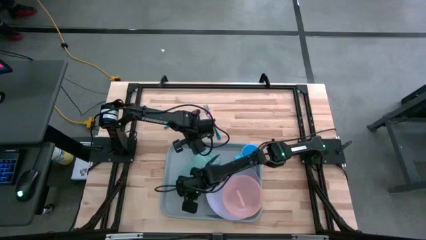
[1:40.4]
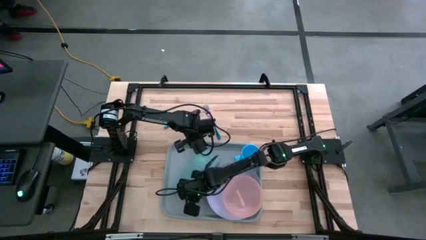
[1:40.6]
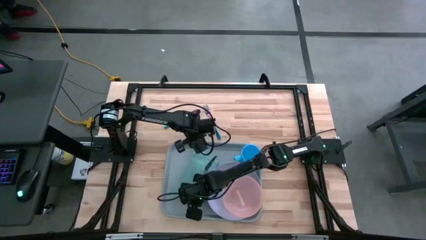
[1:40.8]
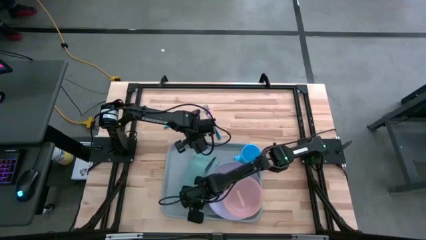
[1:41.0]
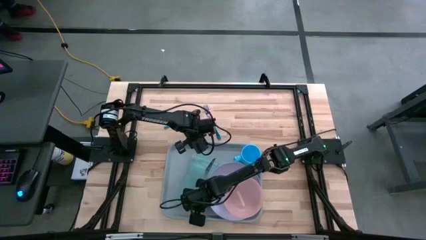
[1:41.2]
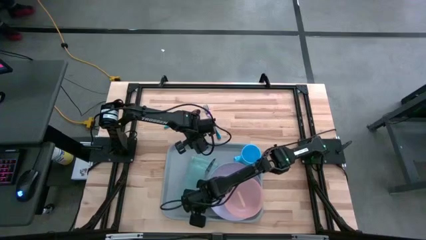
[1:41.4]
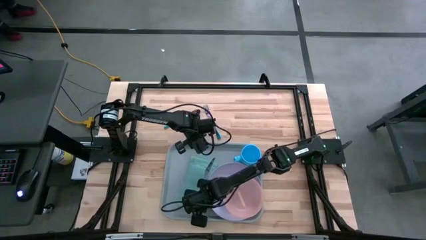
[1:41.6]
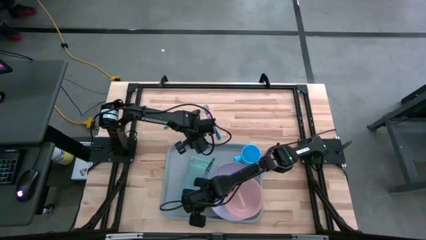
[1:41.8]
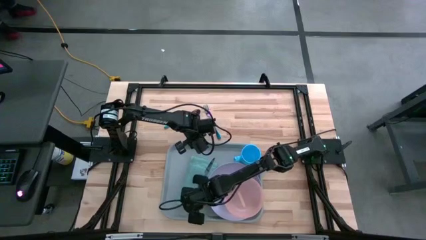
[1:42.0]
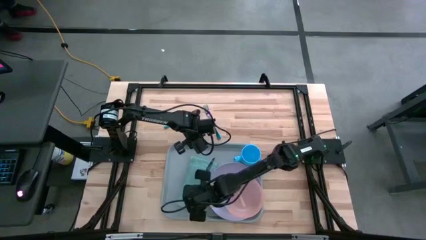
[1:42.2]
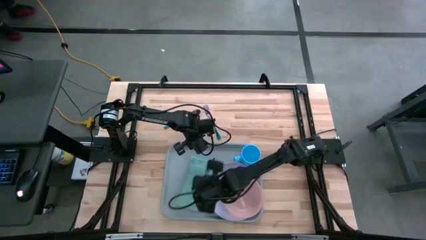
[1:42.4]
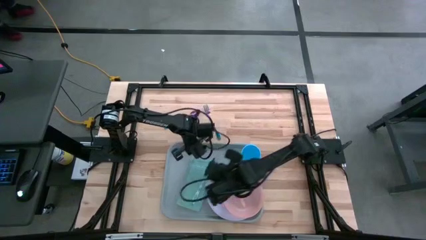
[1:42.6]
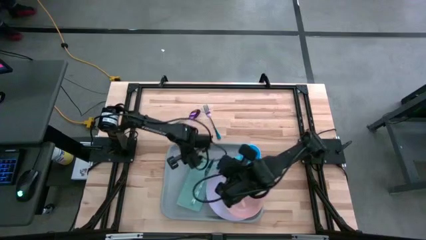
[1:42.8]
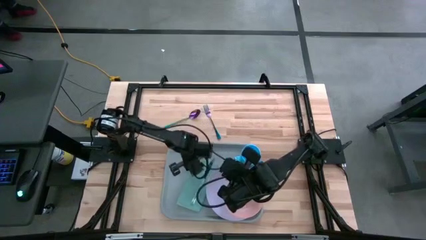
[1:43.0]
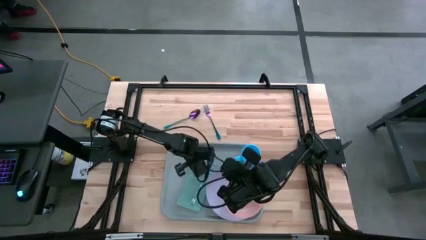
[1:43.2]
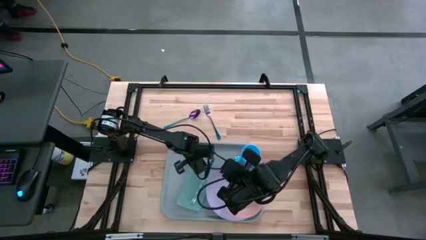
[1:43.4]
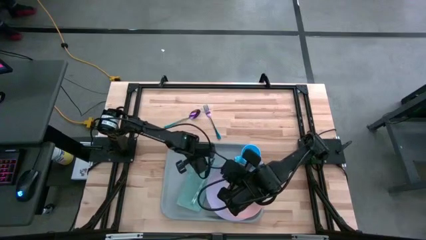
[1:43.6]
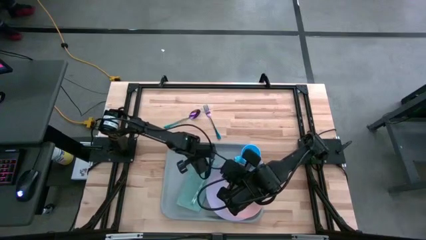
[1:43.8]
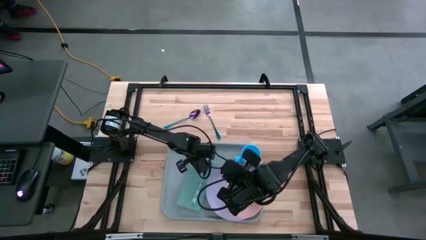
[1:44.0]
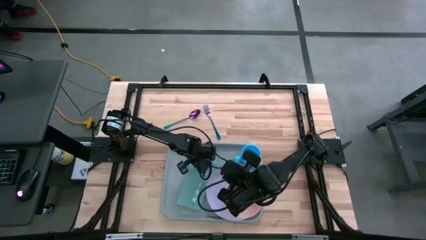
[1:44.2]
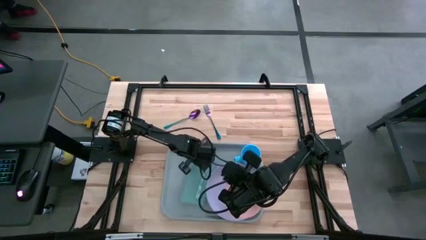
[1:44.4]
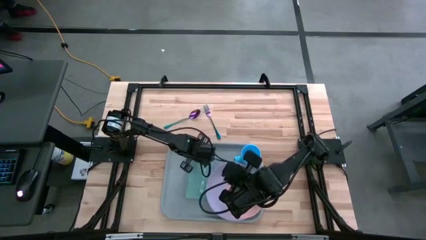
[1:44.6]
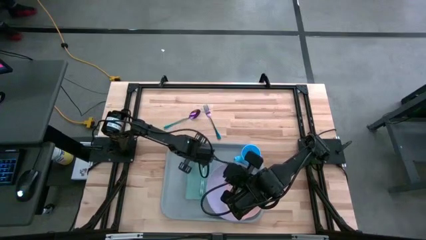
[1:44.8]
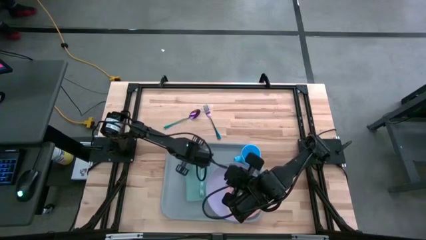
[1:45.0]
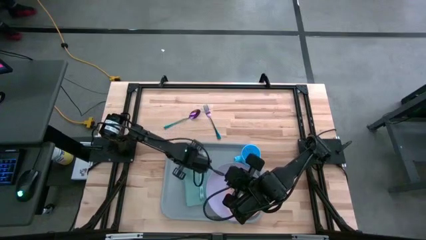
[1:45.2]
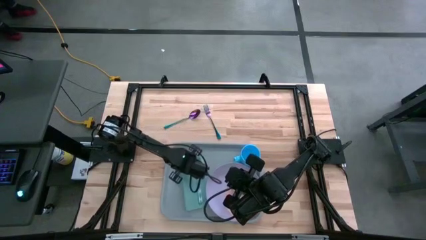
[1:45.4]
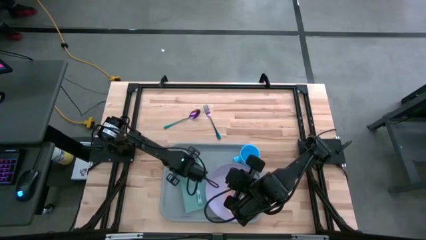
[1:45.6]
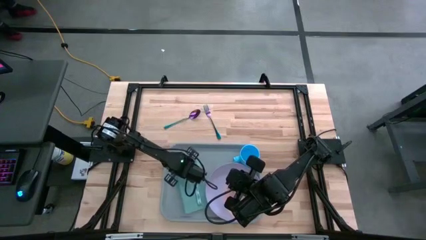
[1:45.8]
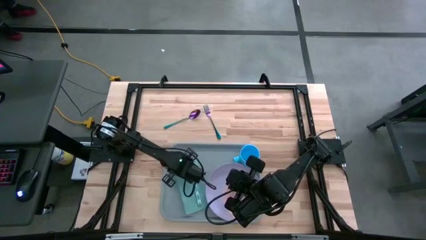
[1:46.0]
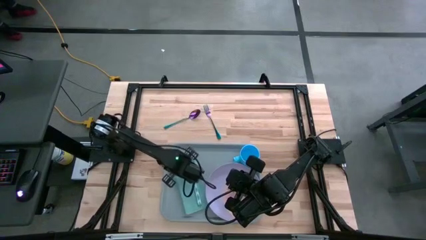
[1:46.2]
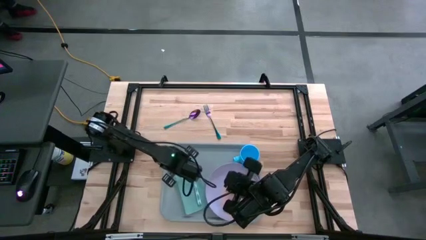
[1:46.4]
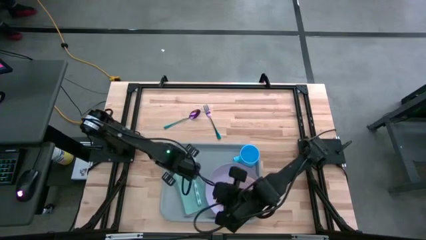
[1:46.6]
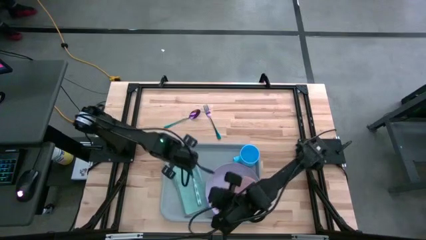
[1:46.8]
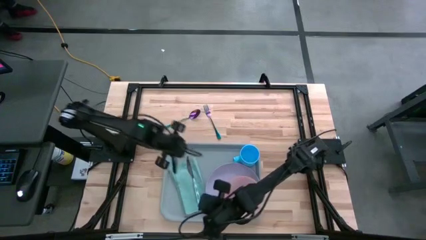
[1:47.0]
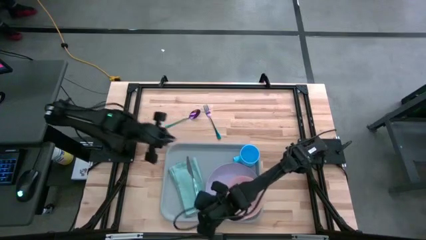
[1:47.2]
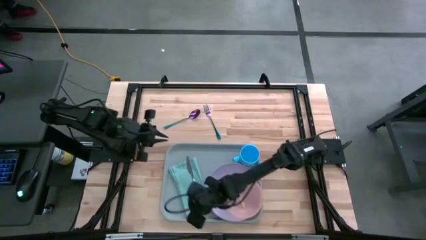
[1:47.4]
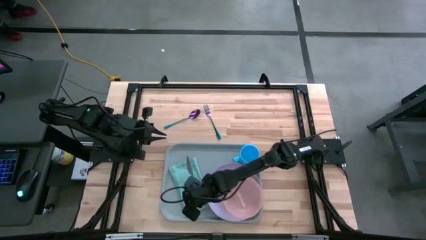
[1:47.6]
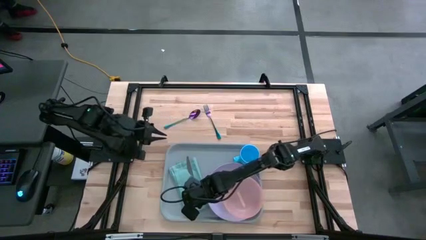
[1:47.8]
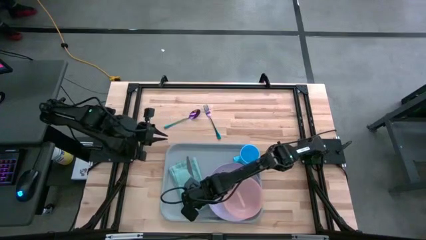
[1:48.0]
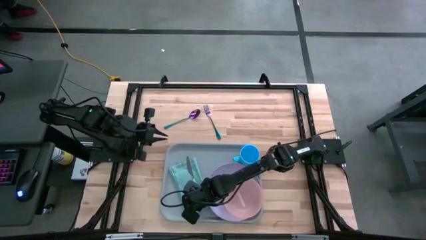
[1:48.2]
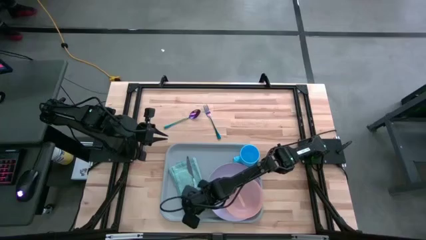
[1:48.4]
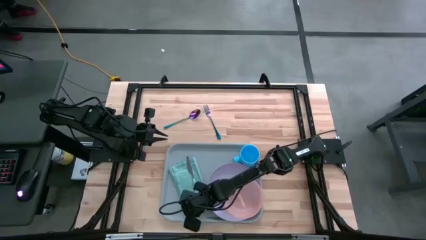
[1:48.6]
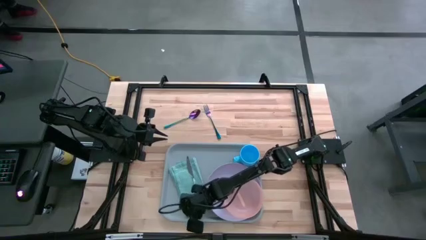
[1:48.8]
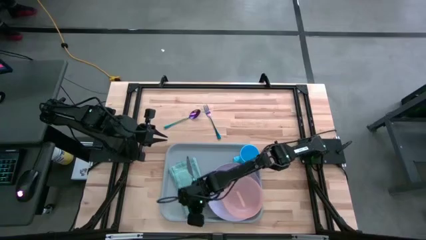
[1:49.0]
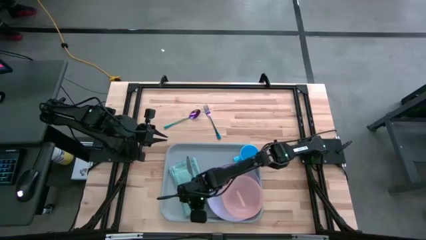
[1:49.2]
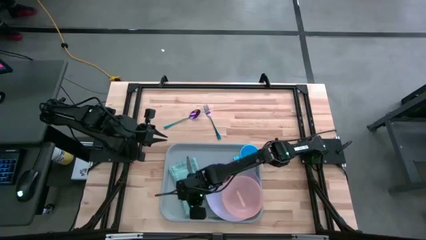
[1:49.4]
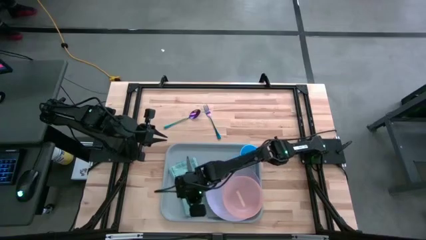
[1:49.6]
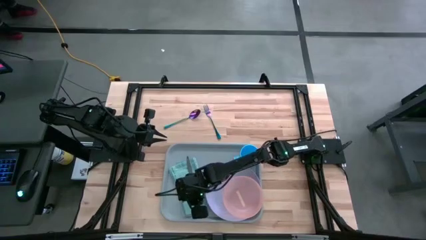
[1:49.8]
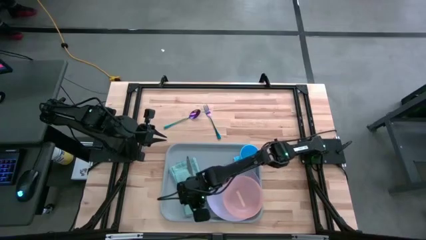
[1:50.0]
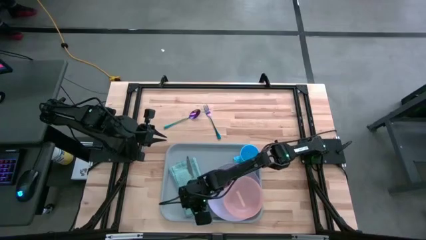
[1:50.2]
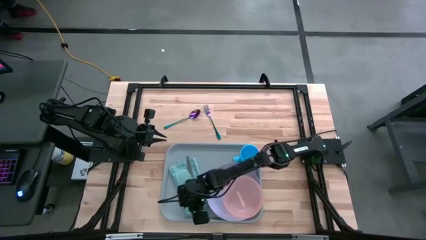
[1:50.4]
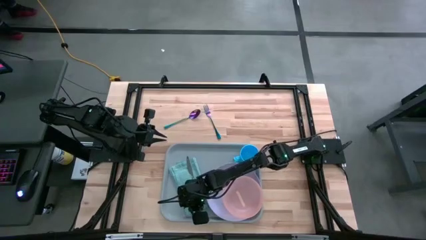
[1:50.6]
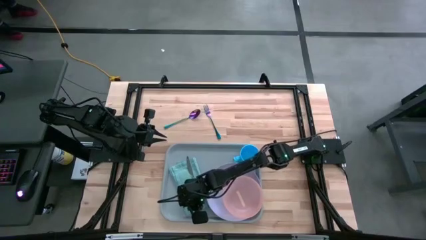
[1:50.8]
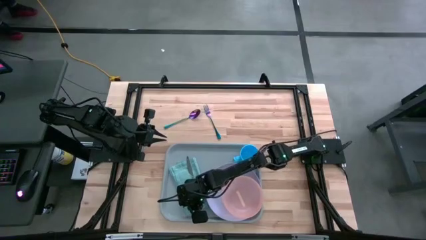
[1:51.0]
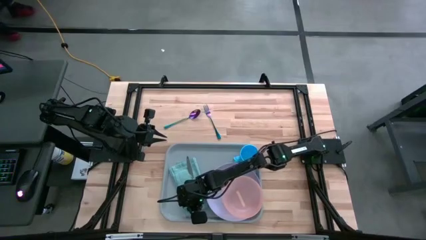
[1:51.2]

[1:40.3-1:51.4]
Task: Set up tray
Adjust the blue napkin

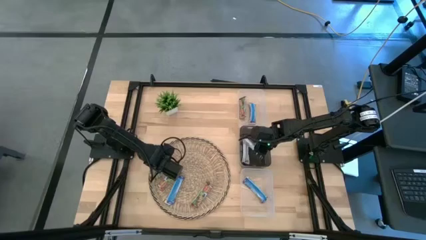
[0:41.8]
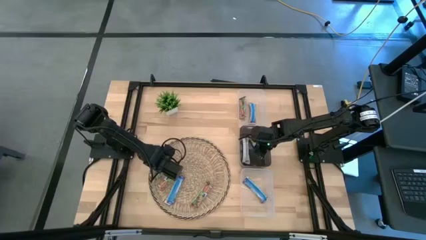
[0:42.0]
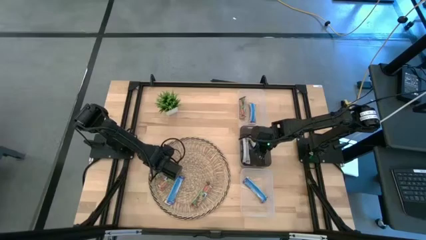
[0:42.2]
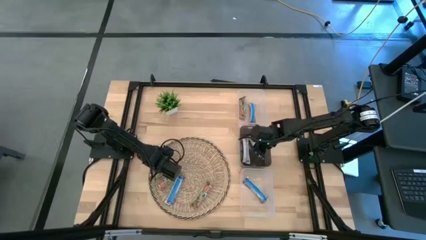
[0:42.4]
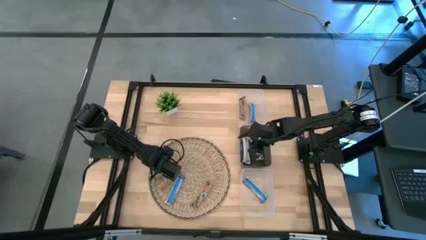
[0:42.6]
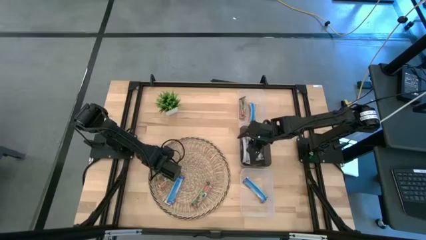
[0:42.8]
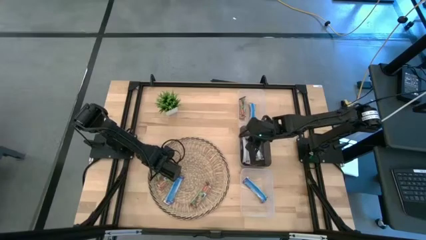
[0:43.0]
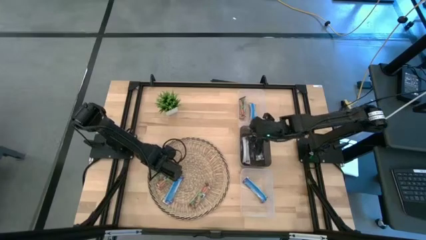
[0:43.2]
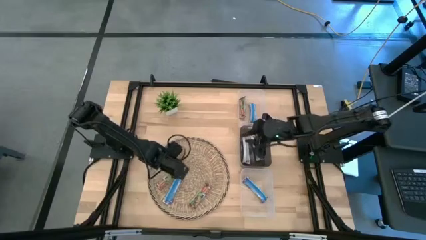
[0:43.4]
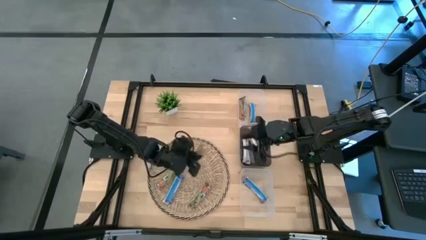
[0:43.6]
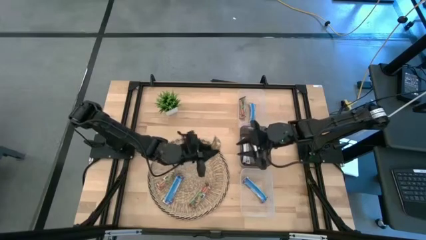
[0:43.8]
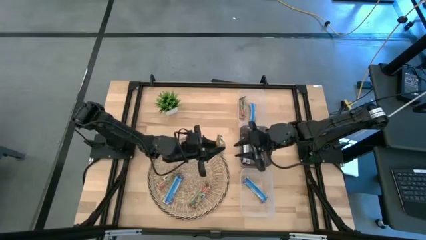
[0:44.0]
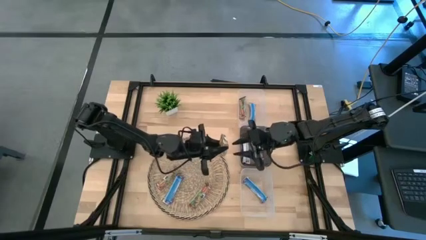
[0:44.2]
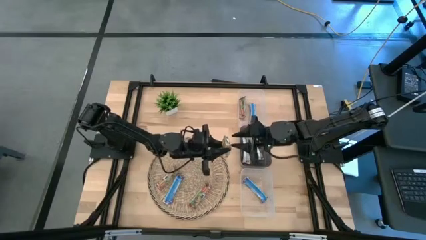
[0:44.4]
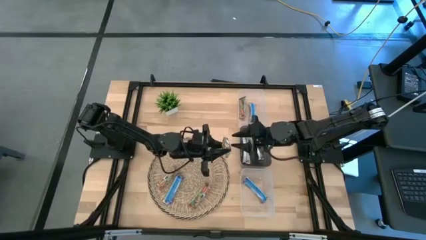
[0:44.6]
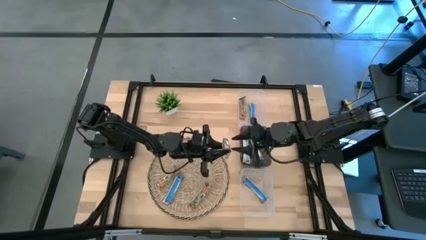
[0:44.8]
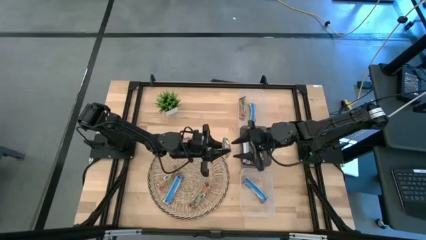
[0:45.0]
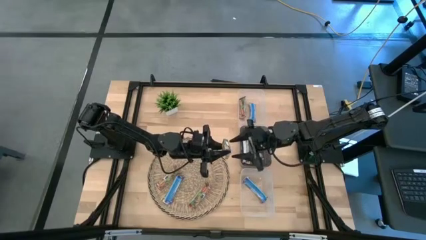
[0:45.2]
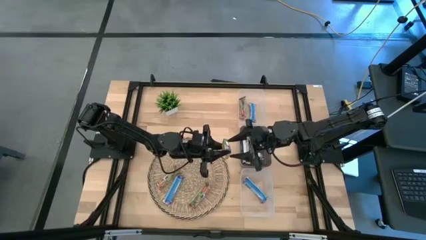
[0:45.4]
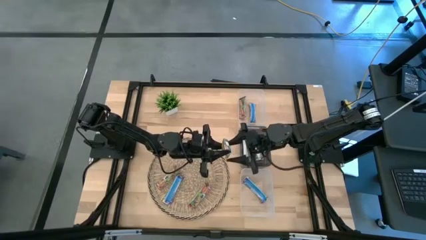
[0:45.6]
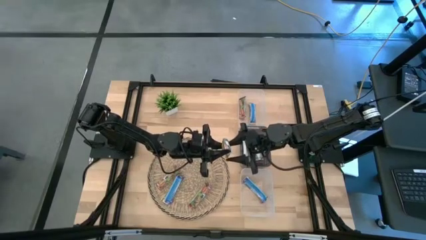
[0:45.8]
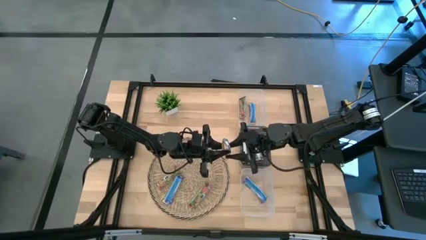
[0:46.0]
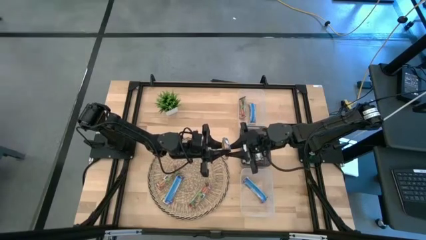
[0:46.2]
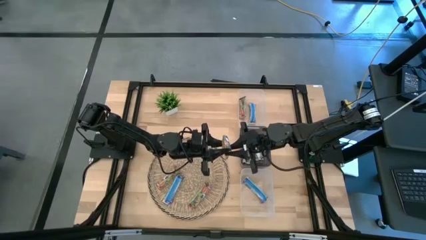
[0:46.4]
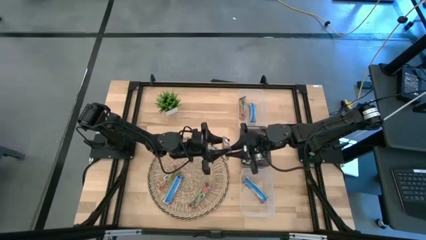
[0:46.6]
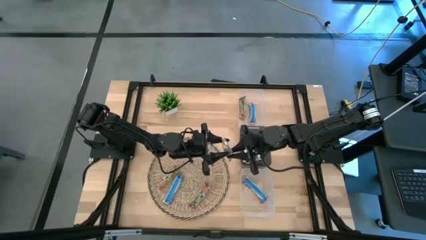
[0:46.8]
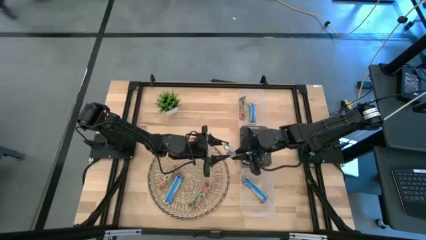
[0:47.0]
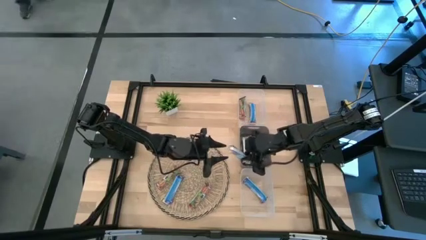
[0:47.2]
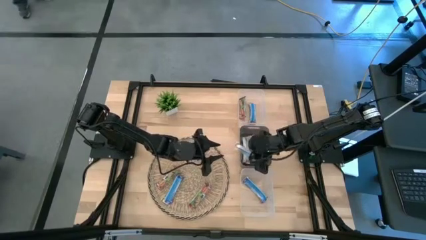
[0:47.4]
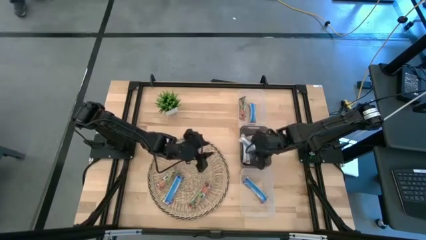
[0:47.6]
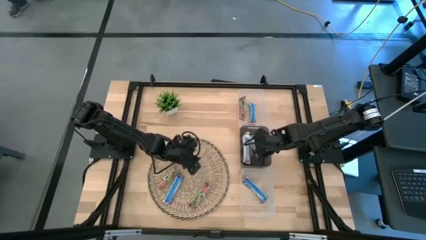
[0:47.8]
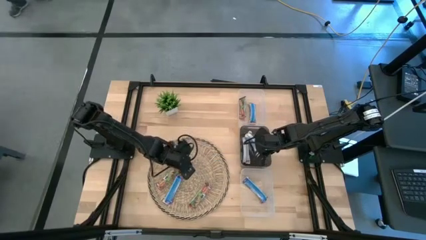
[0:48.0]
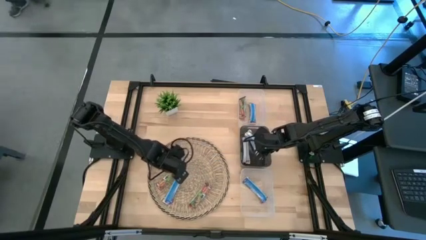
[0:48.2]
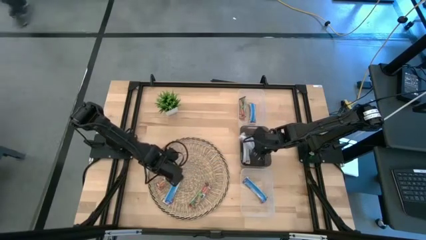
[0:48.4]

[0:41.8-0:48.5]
Task: Pick and place Granola Bars by type
Put the yellow granola bar into the black bin
